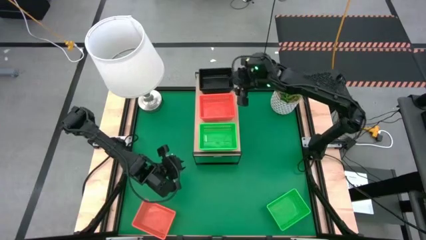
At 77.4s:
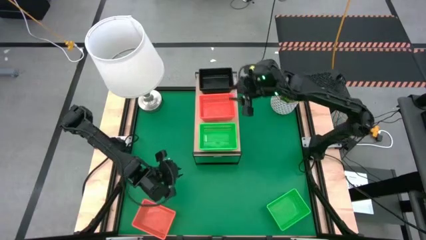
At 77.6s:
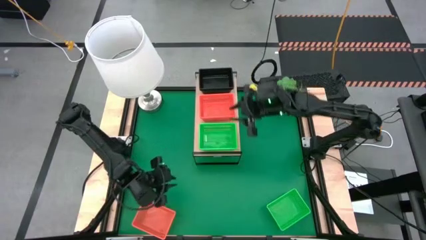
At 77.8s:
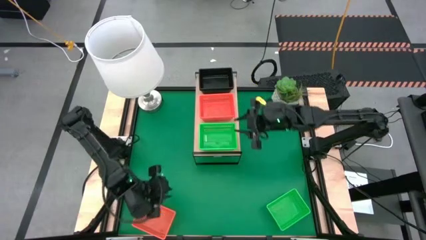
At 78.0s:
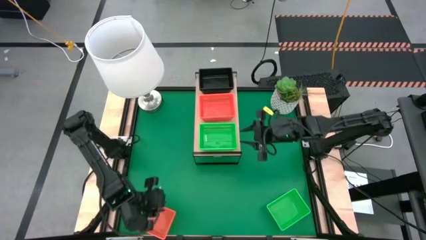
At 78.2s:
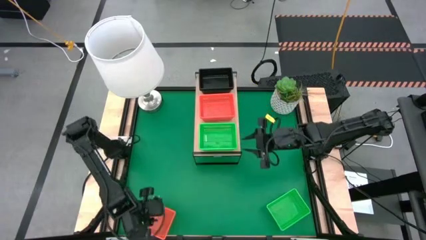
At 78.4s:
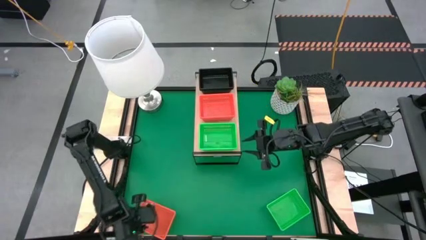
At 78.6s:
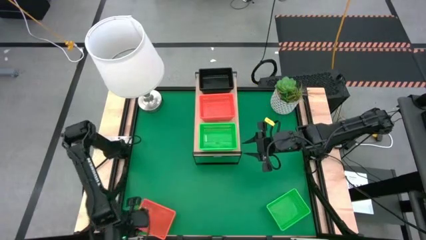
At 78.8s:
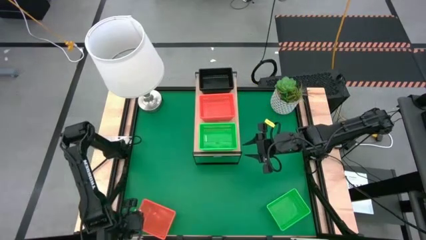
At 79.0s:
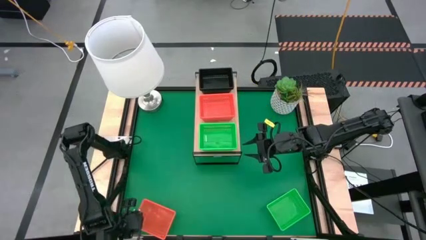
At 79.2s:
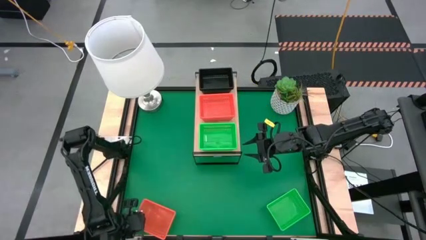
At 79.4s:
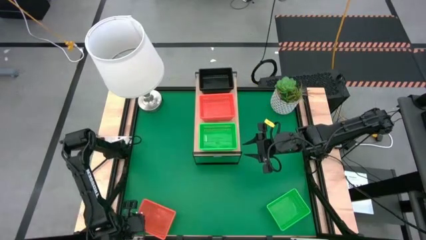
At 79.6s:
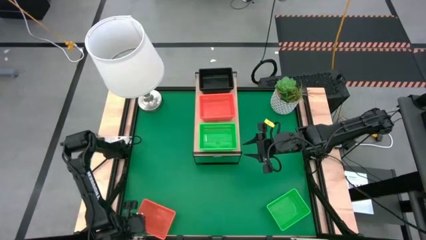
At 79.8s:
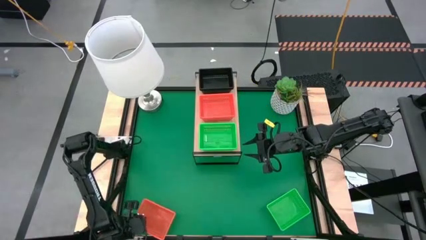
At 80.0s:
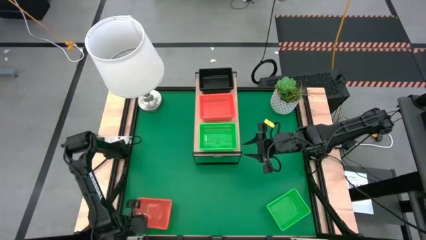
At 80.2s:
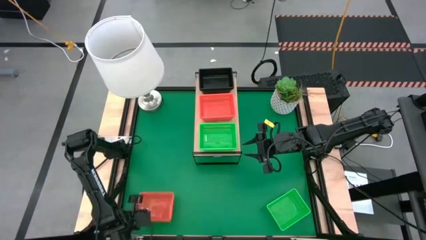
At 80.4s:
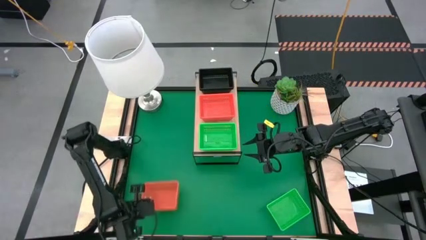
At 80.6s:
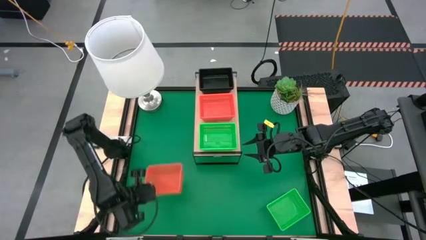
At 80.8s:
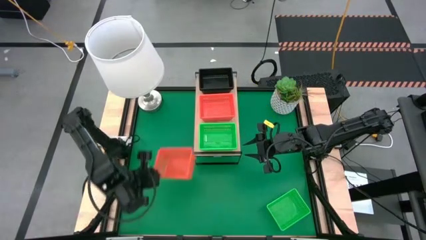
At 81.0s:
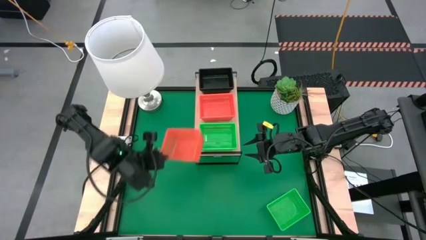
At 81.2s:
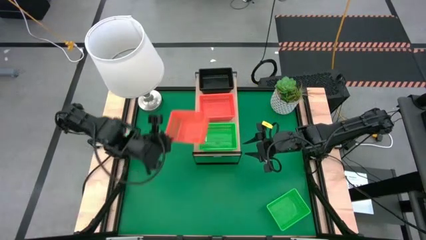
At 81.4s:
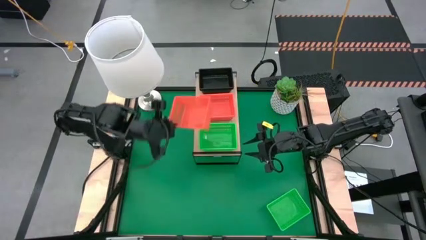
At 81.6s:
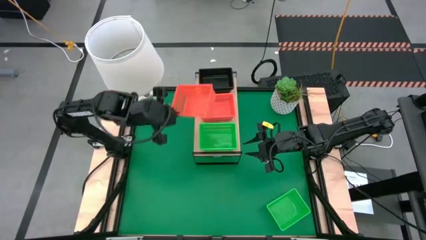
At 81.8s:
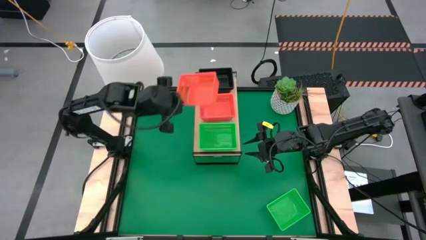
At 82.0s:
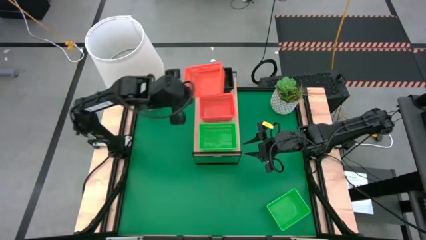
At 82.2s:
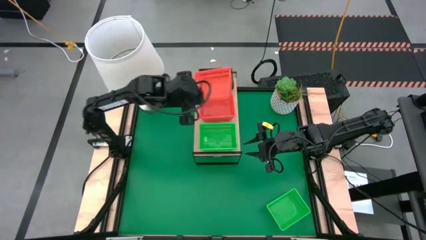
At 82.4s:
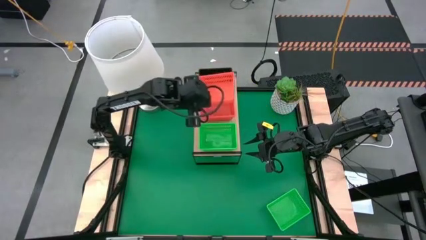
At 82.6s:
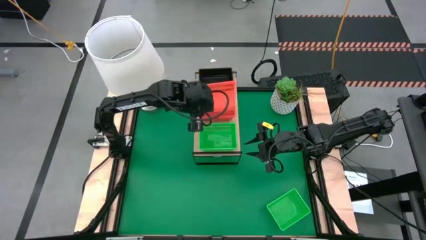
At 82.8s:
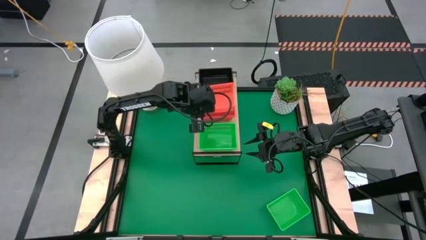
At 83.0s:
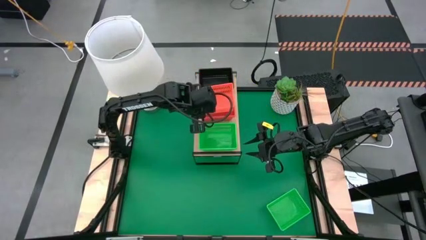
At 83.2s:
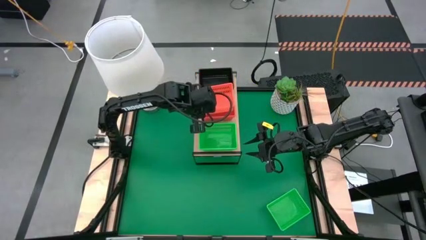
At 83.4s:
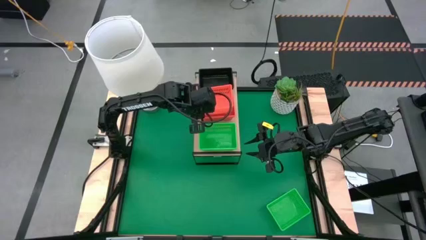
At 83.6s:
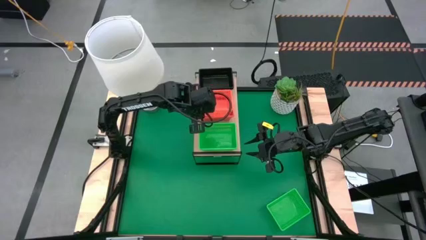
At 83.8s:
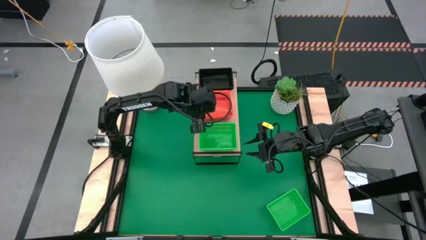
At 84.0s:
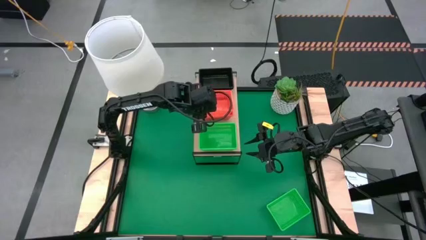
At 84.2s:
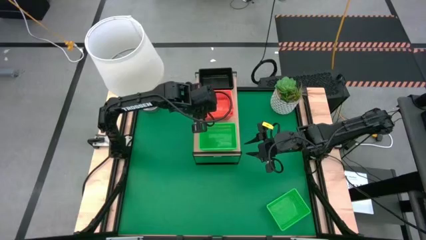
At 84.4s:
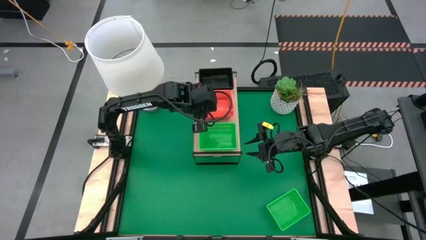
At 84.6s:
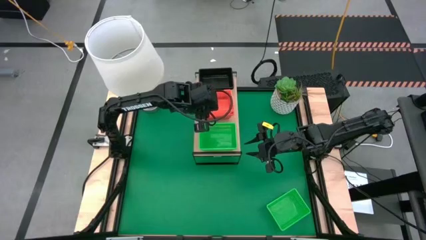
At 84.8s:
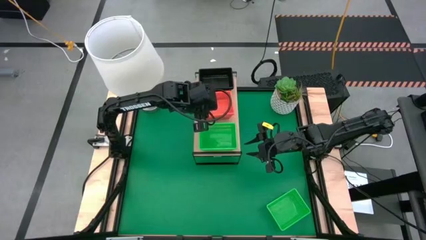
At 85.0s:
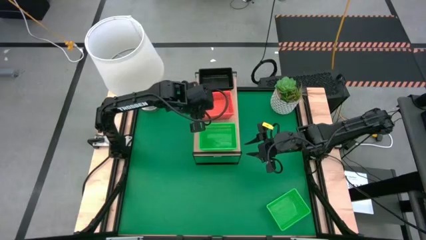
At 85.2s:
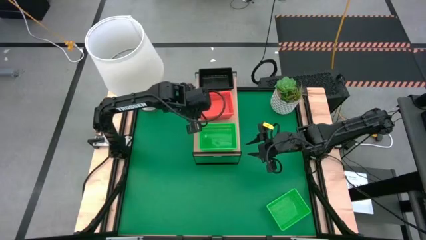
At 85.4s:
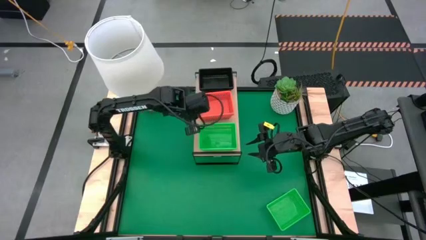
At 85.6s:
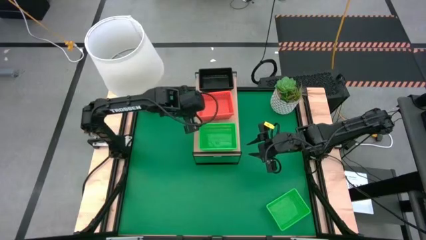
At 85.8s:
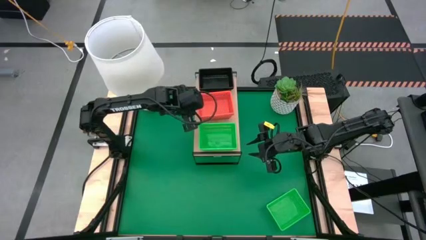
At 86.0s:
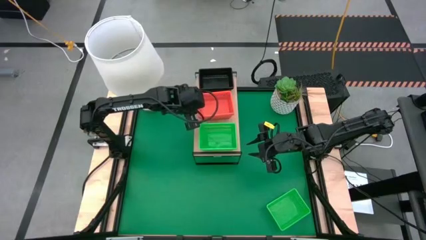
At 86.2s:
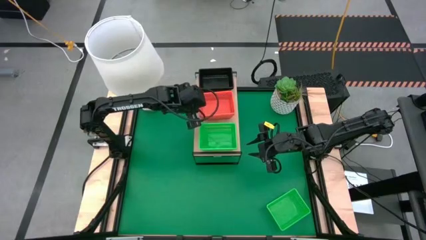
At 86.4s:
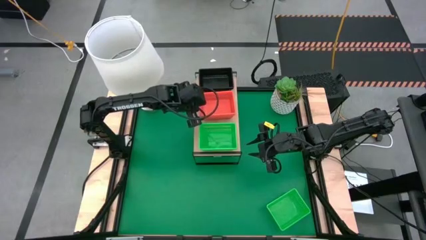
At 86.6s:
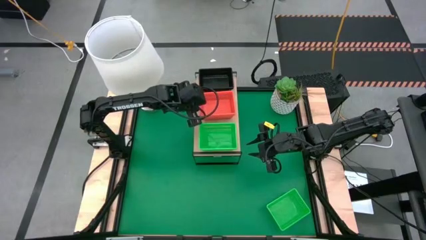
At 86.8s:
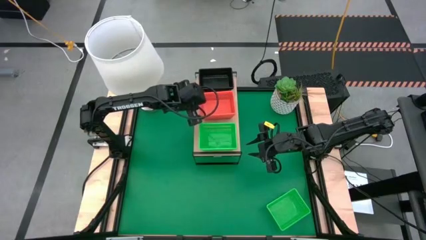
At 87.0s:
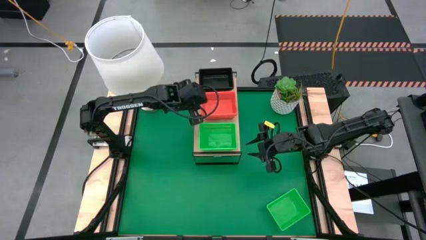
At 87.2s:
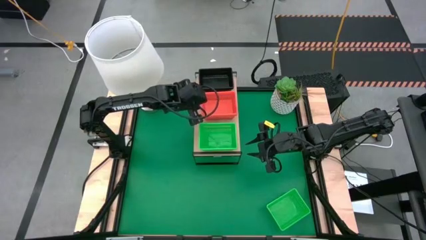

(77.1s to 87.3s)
Task: Stack baskets on shelf by color
Stack the orange bin on top of the orange bins on the shelf

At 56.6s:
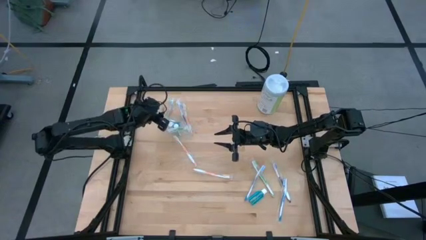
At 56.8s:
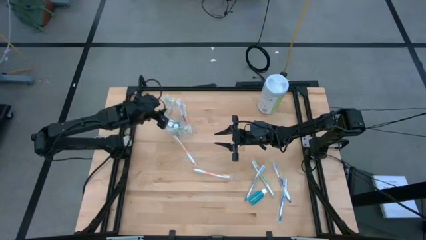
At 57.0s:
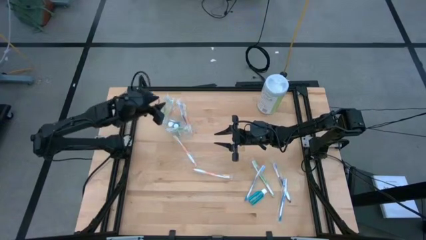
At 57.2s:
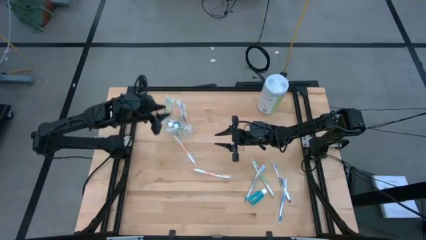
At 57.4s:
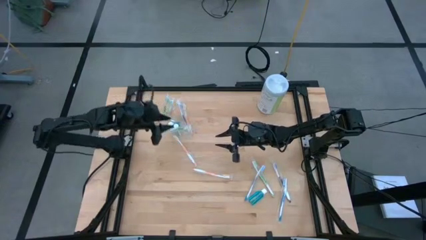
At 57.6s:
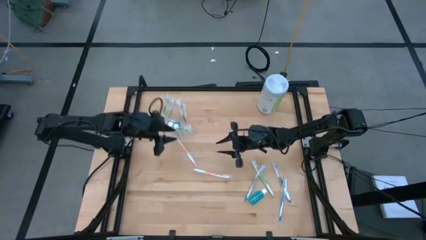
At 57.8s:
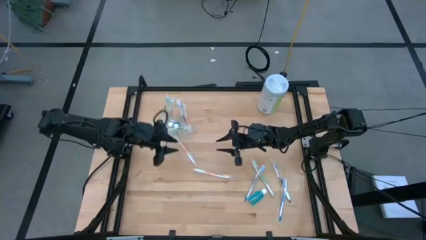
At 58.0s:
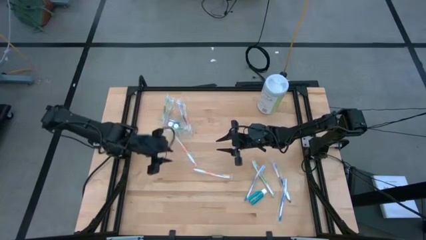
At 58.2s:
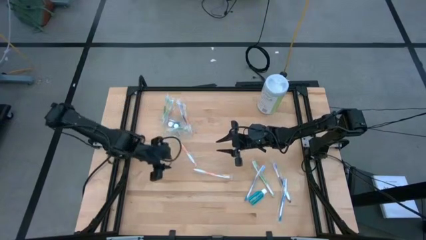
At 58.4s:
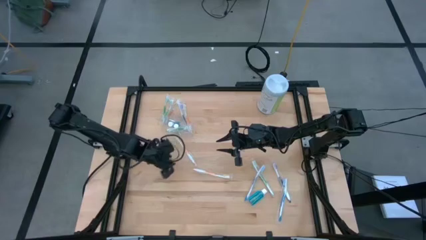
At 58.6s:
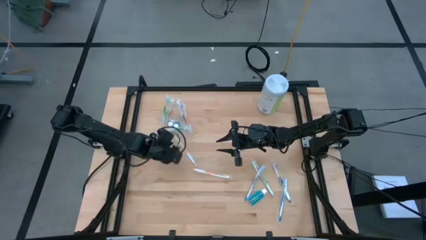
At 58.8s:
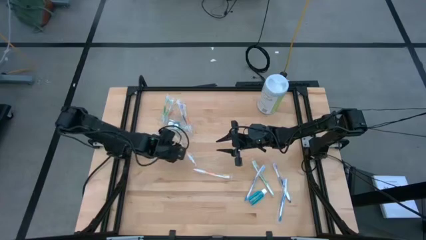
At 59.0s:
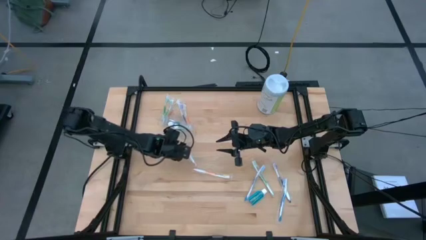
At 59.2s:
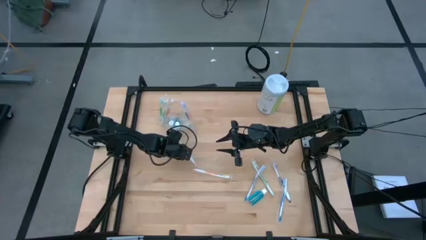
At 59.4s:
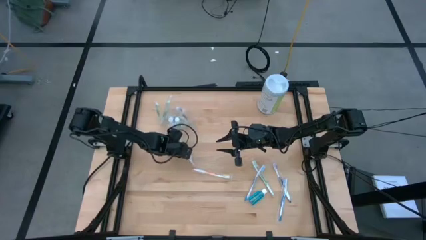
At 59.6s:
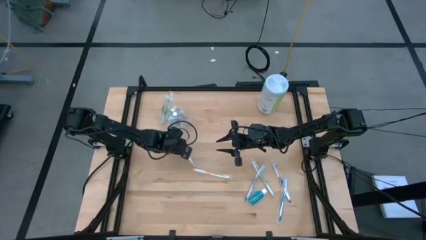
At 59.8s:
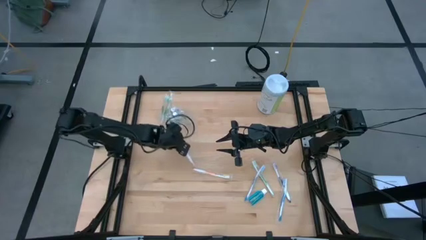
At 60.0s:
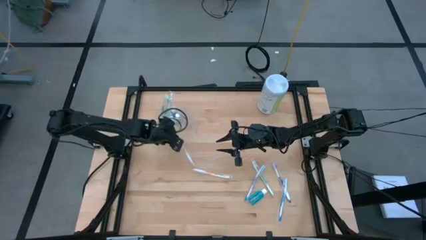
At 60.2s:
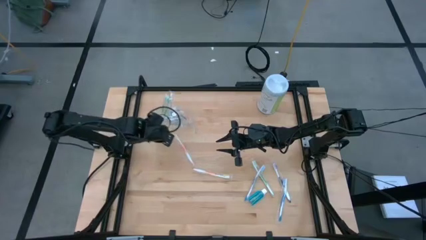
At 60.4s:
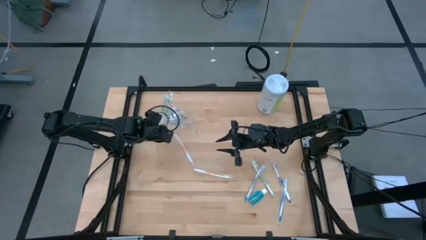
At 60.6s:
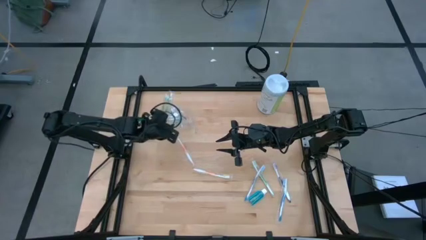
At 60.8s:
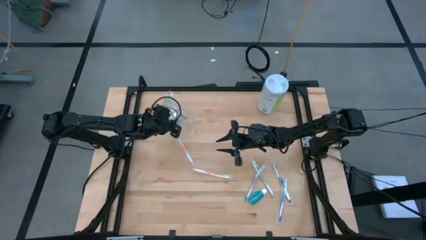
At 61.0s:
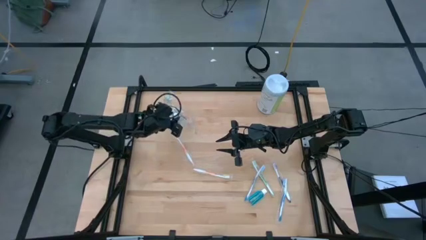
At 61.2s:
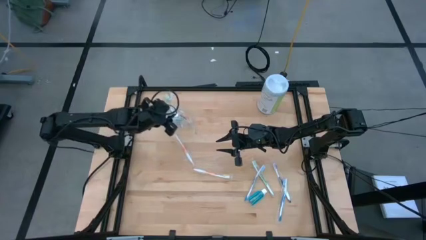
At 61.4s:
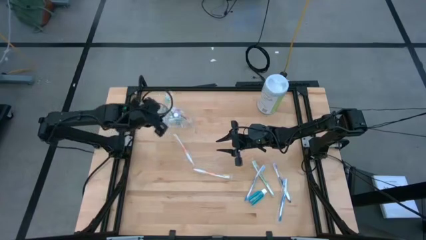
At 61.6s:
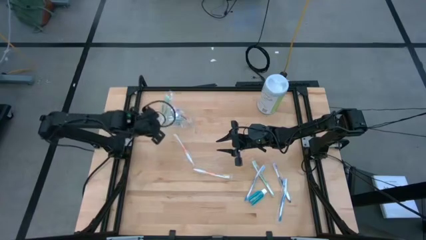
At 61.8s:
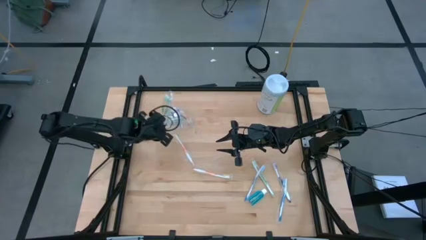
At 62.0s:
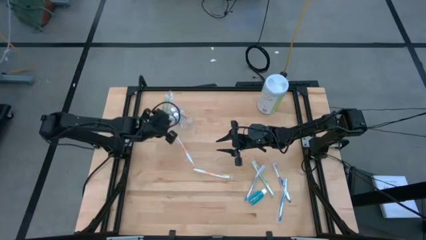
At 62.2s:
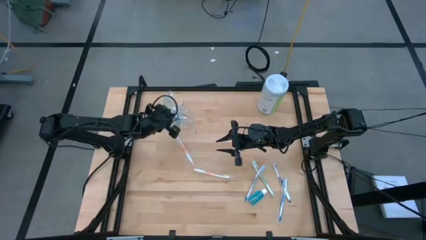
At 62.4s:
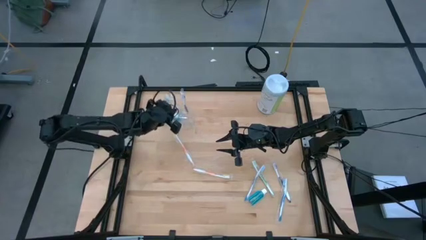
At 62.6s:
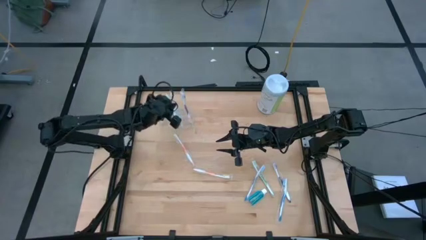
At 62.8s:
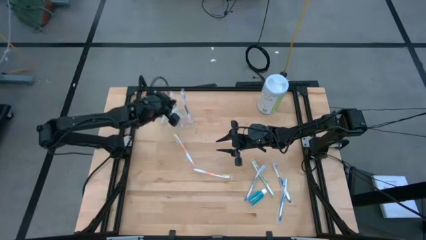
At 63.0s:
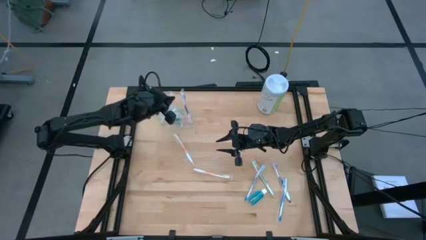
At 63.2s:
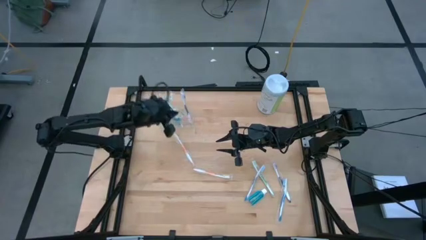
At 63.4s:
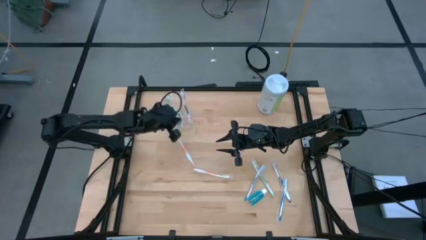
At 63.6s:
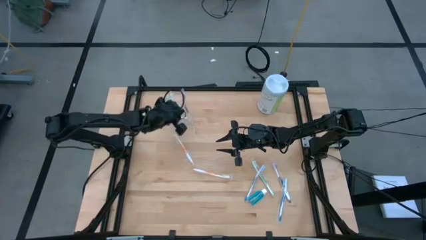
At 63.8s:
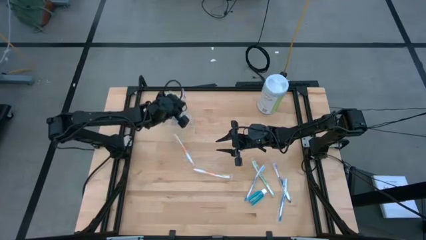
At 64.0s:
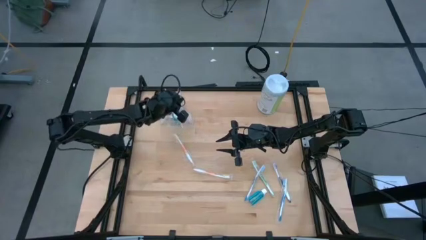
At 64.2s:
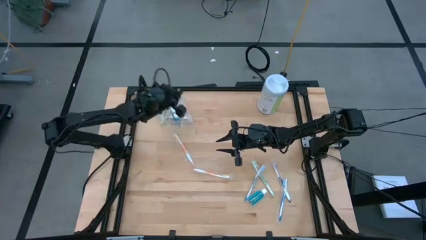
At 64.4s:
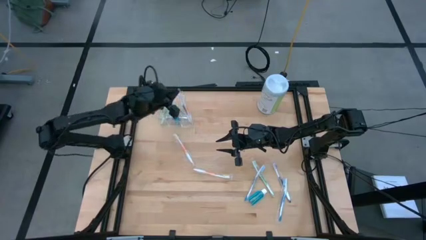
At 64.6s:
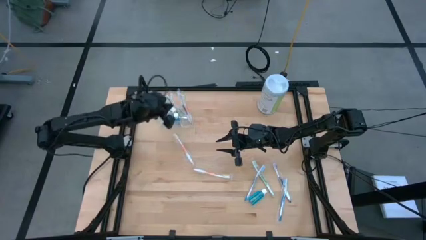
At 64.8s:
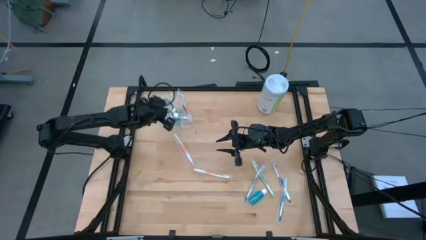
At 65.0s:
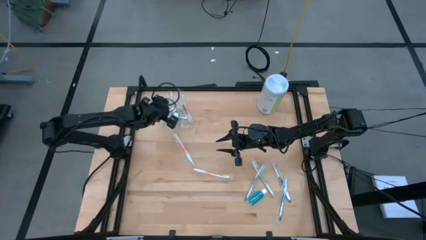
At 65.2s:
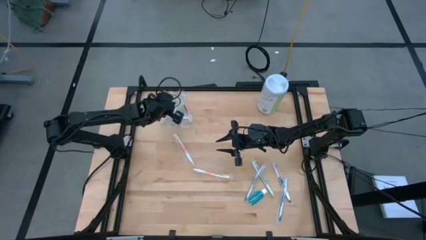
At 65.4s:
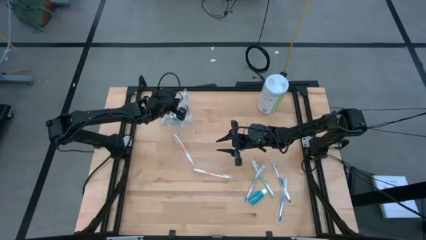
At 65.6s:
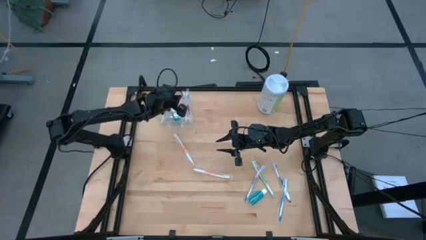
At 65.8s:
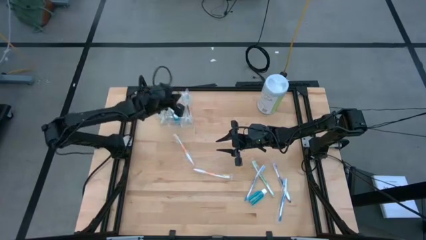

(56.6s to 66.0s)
Task: Pick & Place toothbrushing station
Adjust the toothbrushes in the transparent organizer
